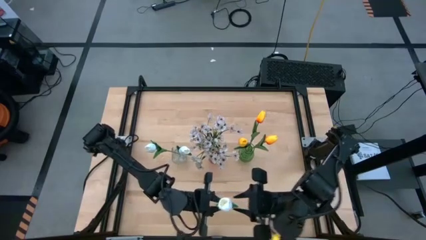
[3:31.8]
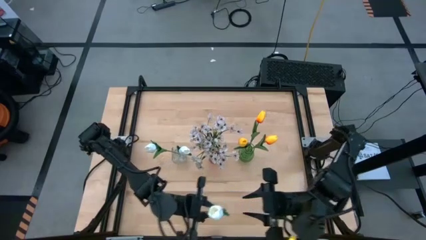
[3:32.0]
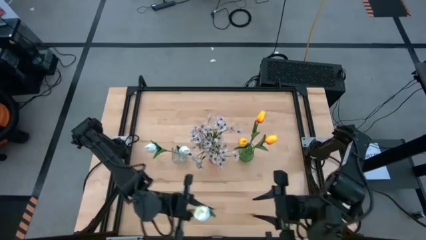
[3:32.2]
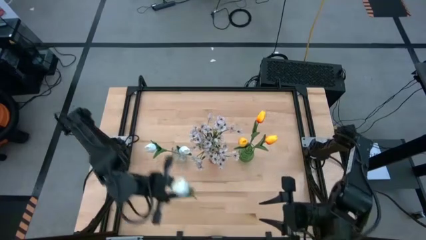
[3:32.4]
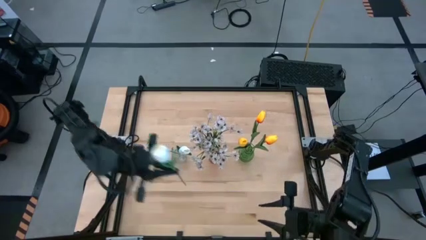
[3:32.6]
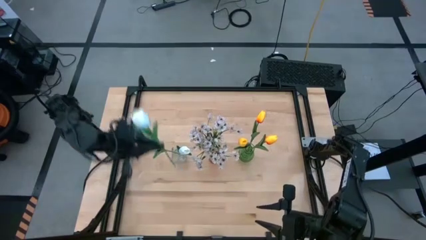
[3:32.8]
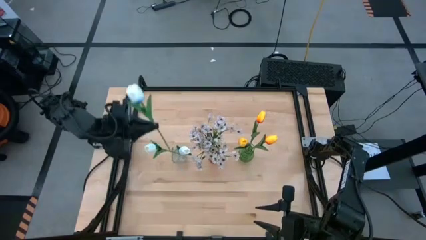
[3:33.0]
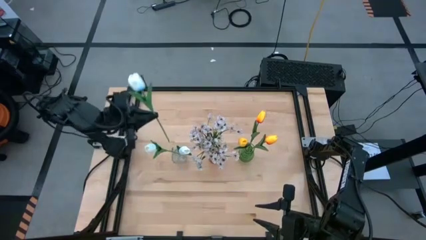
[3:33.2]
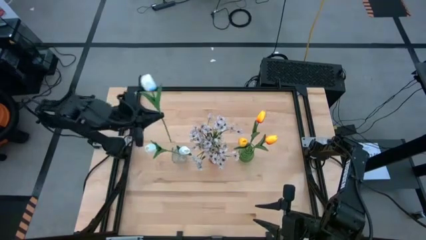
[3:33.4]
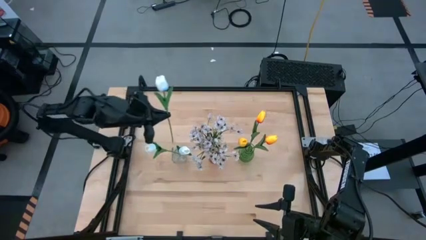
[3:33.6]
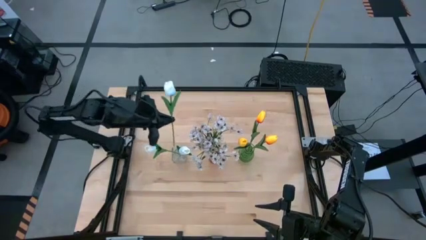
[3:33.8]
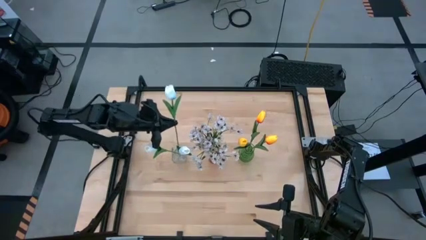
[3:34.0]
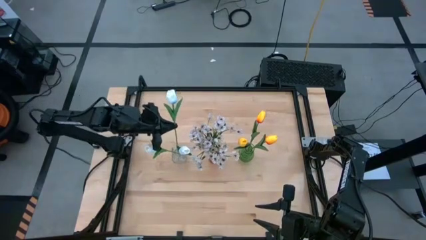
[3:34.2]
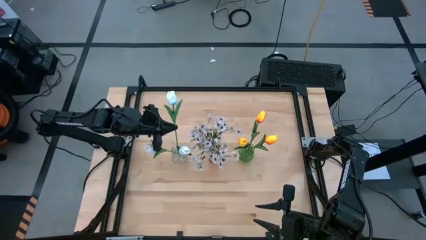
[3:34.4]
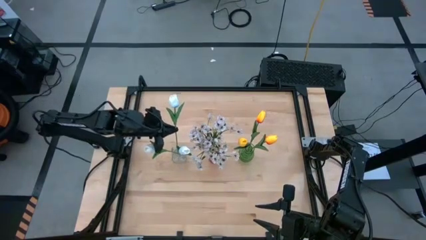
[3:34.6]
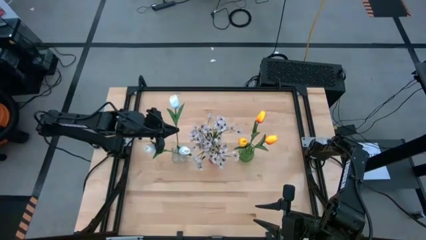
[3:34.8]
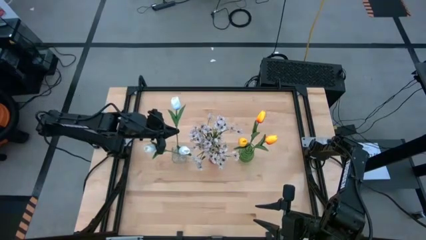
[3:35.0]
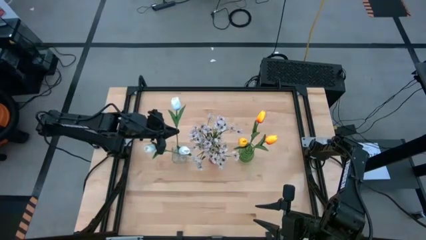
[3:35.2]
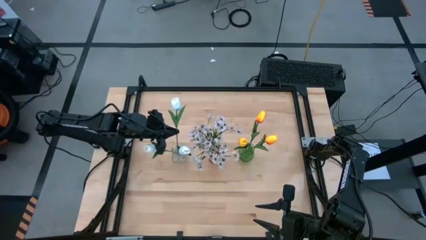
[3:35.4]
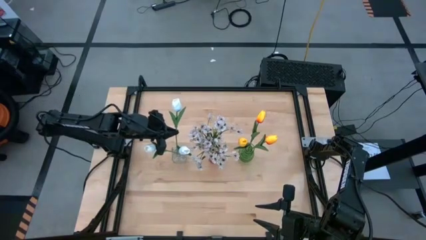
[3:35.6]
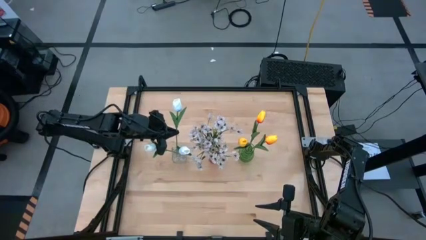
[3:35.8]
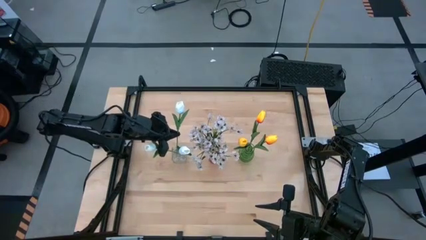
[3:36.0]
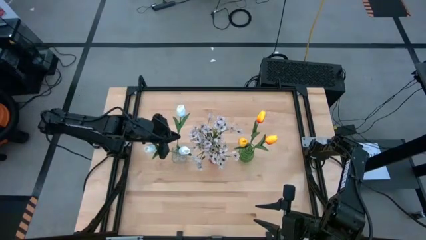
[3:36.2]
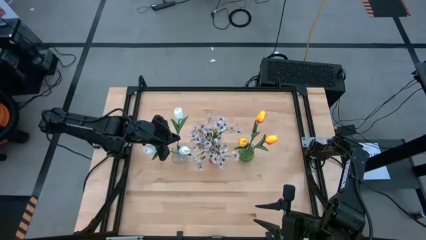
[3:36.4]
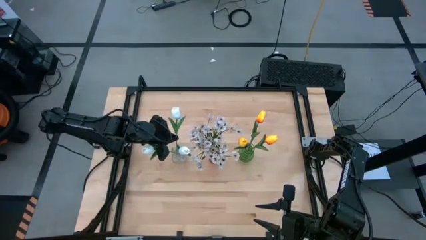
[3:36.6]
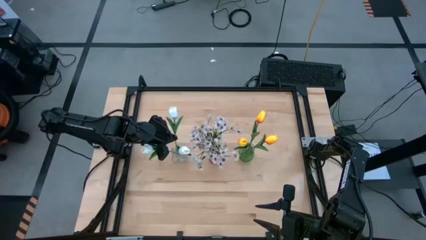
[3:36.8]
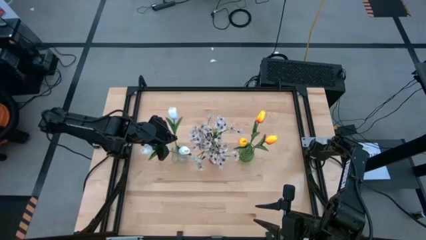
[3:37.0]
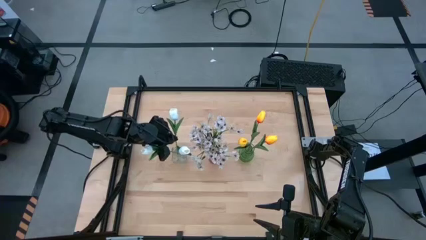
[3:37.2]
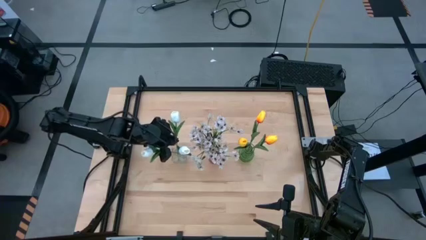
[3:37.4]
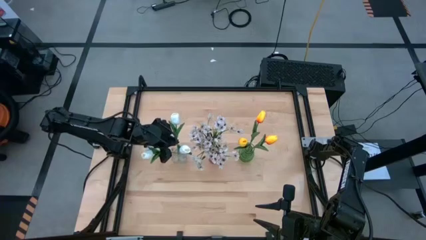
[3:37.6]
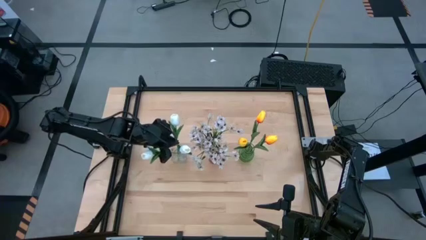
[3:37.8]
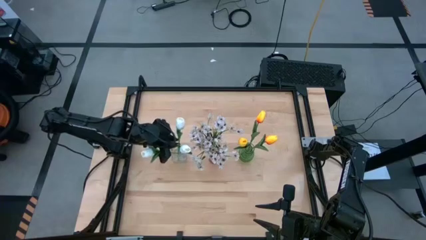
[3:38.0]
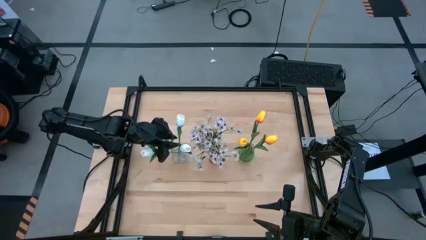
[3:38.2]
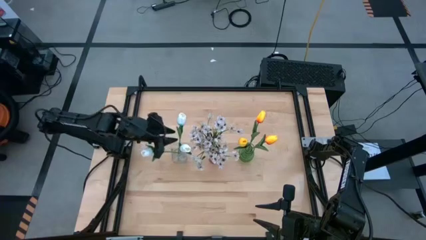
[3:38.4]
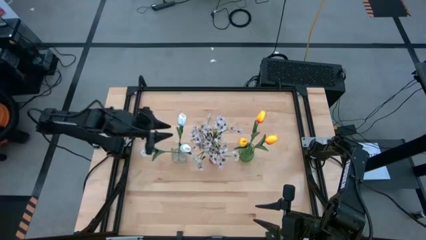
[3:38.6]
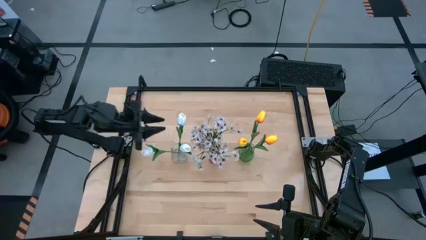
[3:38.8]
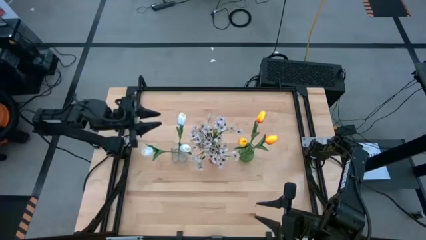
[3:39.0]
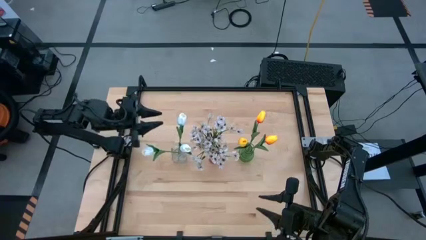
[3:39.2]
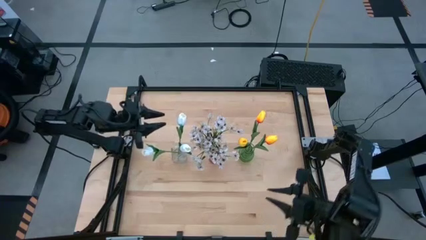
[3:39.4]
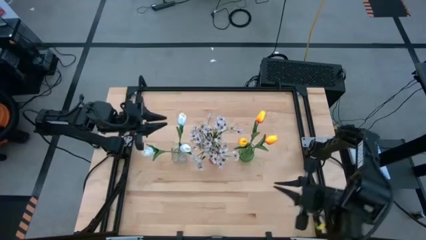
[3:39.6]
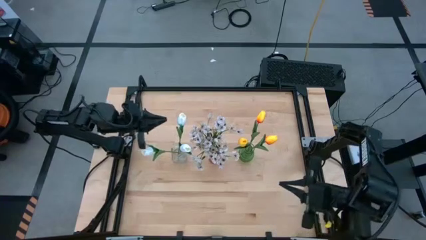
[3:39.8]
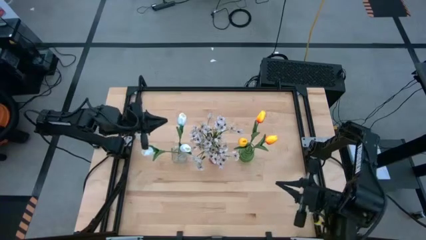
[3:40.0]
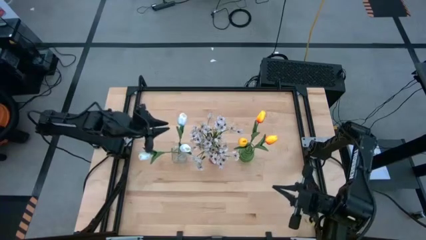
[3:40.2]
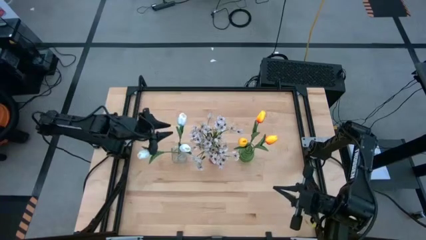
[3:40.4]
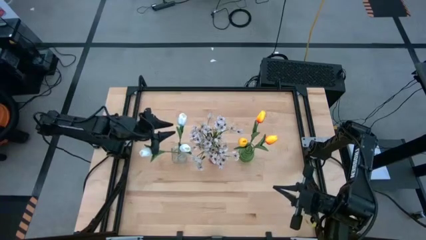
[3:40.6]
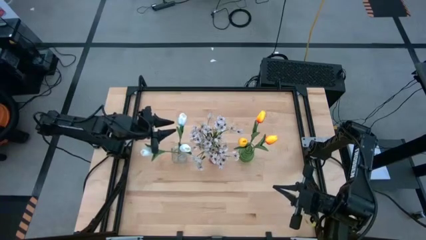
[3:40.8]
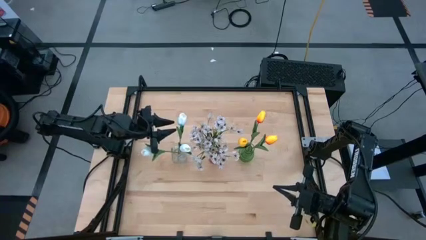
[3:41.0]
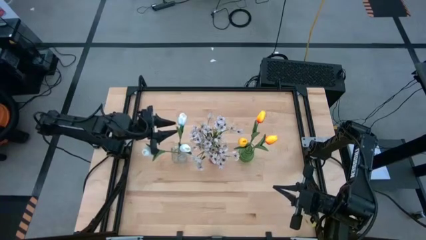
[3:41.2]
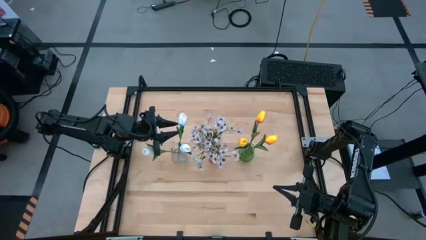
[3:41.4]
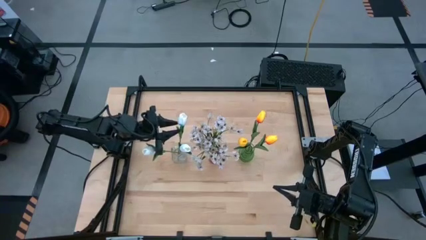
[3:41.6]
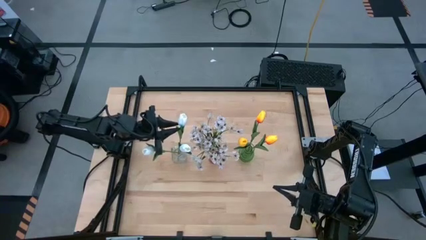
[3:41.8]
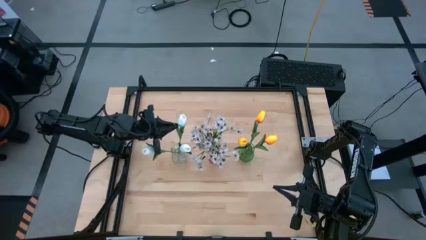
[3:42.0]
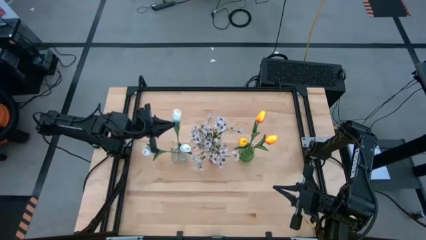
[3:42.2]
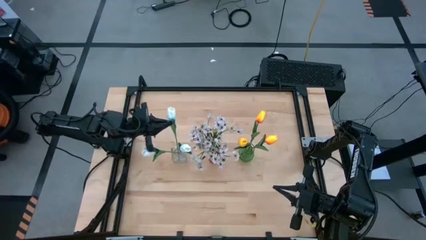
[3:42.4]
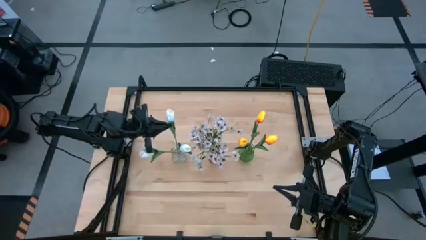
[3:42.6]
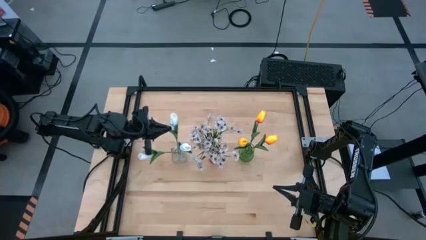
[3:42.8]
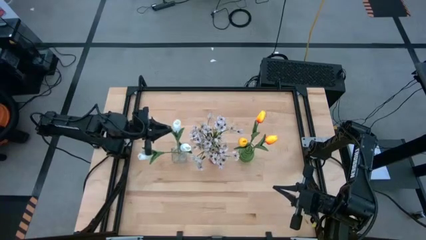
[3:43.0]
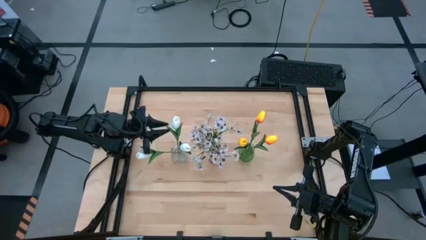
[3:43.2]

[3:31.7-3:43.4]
Task: Sort flowers into vase by color
Put the white tulip into the transparent vase

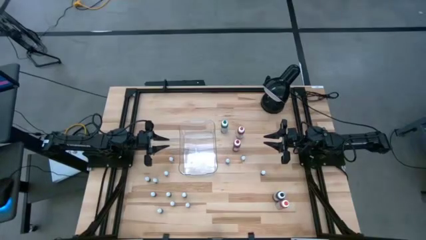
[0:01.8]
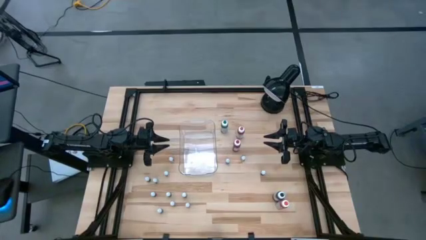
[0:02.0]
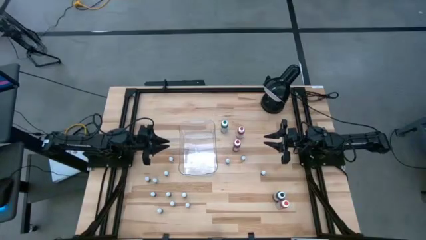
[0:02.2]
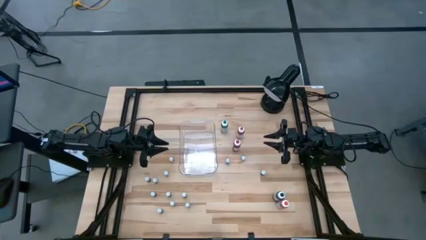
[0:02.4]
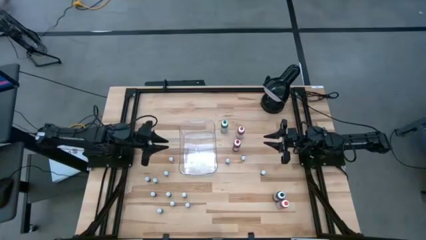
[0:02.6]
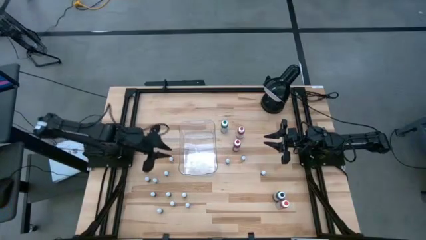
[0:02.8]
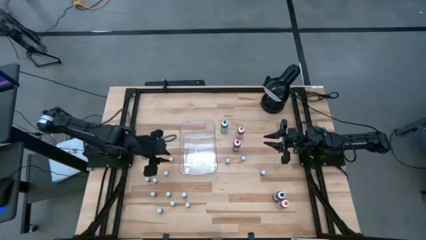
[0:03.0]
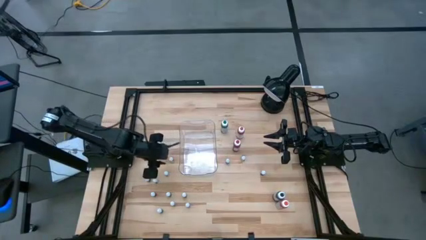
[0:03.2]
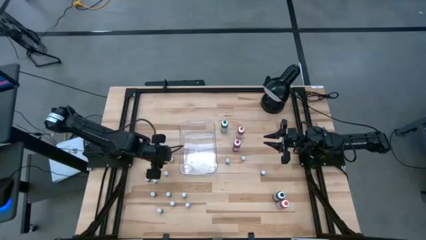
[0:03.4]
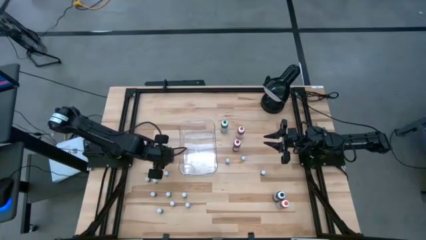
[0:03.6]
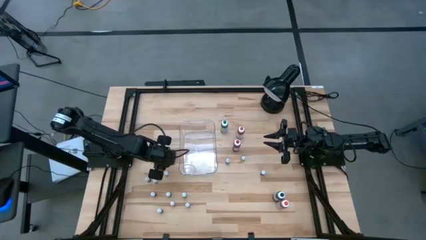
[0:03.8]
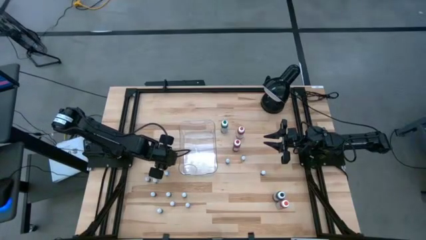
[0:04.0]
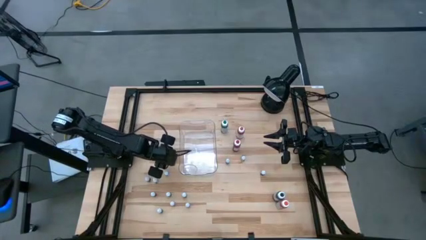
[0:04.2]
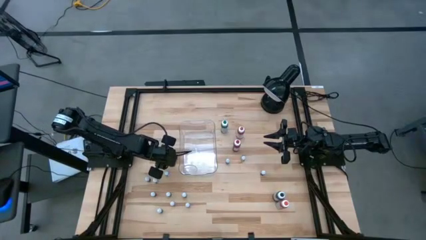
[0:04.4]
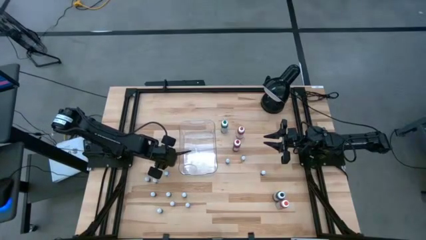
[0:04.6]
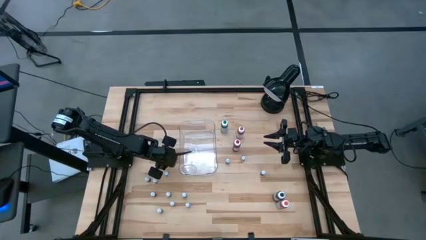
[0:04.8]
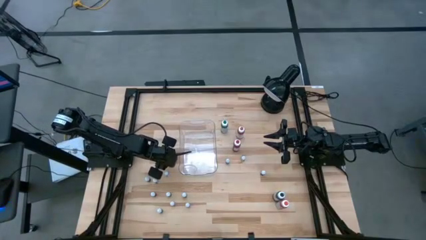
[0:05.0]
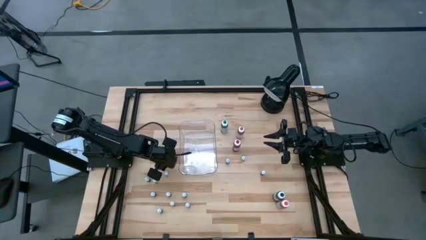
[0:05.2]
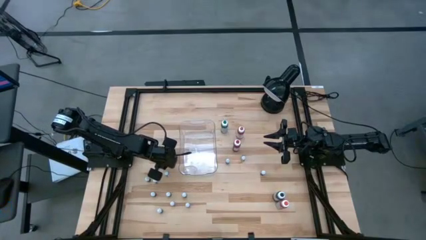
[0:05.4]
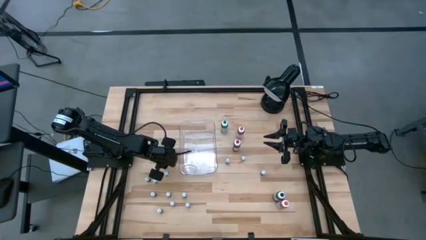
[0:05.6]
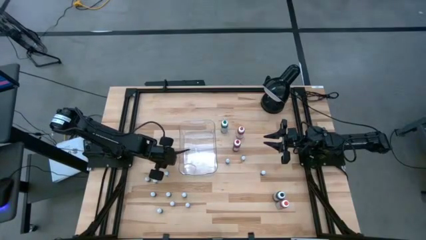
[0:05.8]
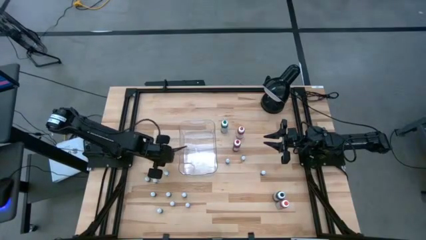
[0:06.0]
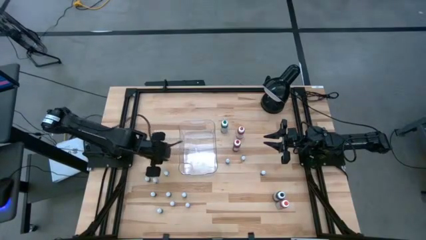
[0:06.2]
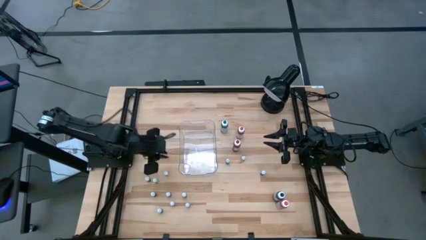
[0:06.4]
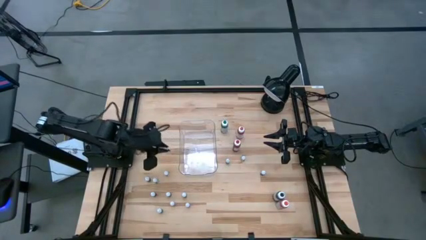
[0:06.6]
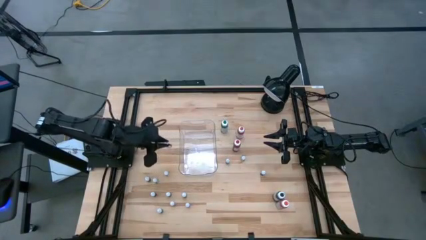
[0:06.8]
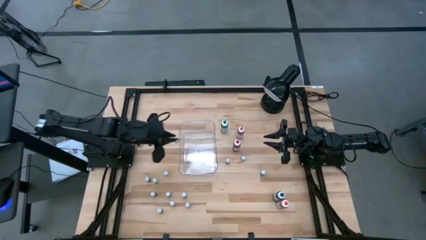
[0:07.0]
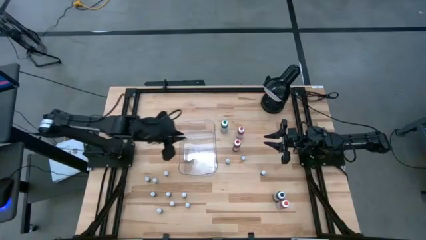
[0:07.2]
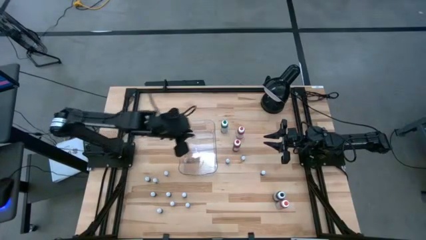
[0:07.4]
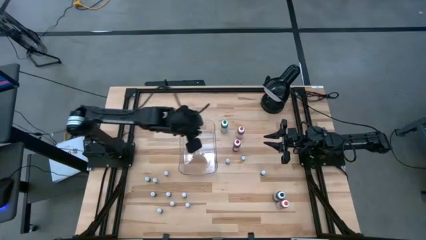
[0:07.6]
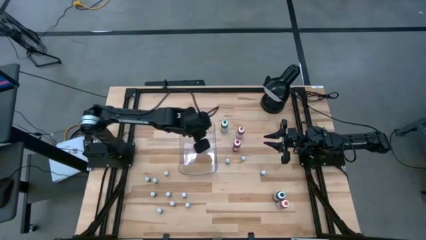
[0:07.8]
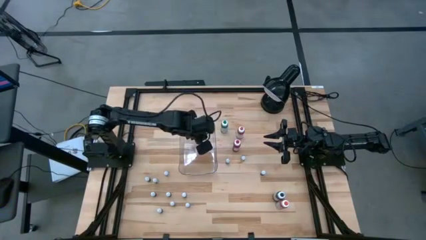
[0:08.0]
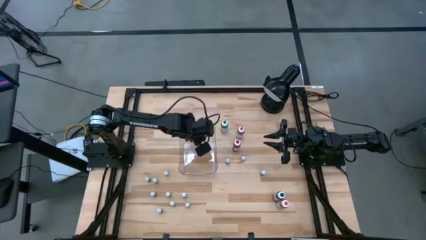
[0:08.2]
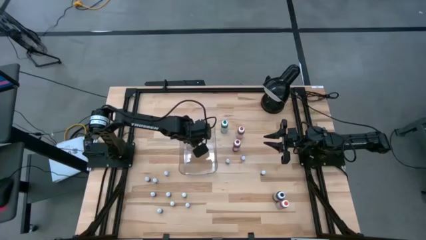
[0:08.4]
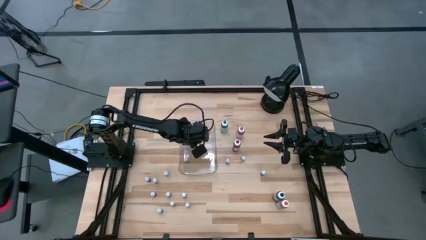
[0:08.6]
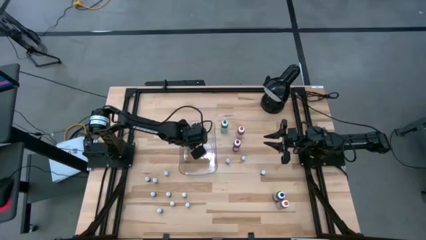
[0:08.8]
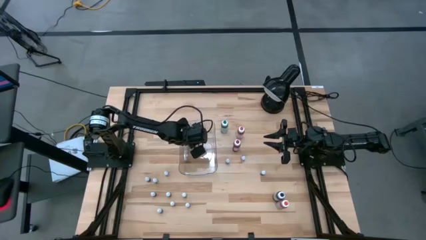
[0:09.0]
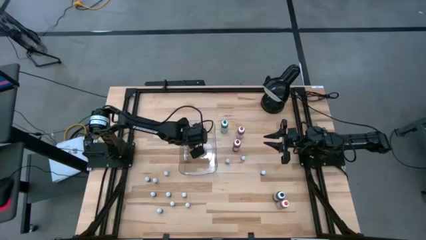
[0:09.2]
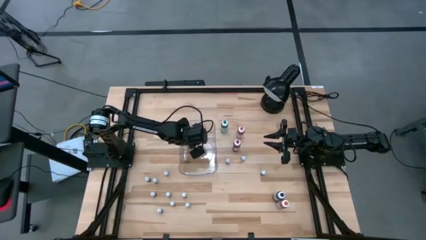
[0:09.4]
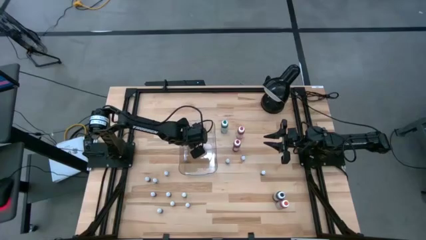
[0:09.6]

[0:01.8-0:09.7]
Task: Pick & Place food coloring
Put the top small black food coloring bottle into the transparent bin
